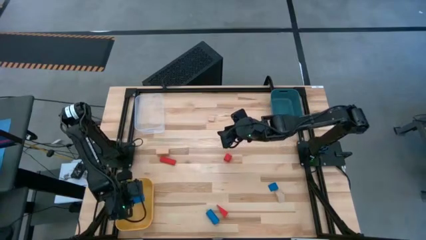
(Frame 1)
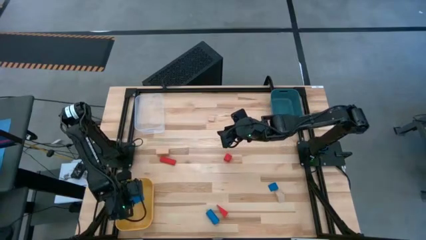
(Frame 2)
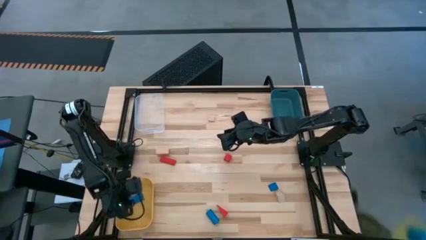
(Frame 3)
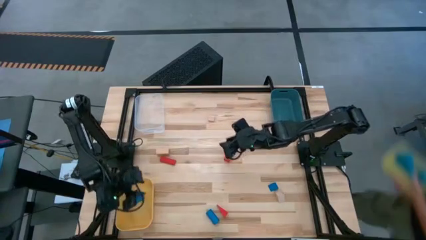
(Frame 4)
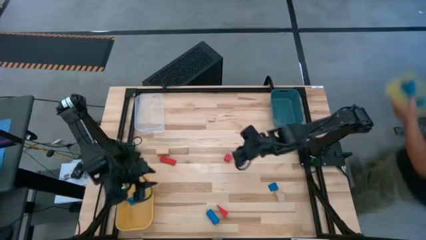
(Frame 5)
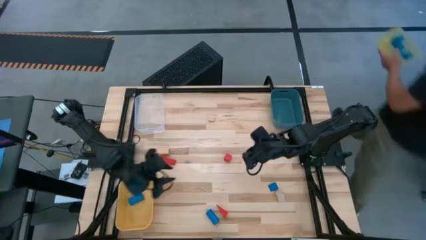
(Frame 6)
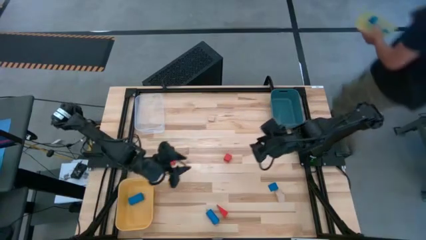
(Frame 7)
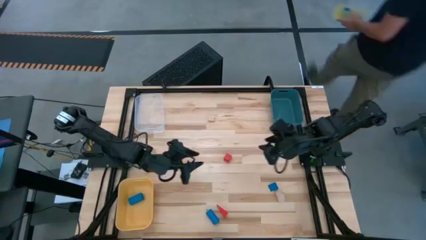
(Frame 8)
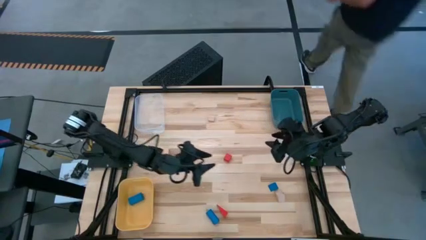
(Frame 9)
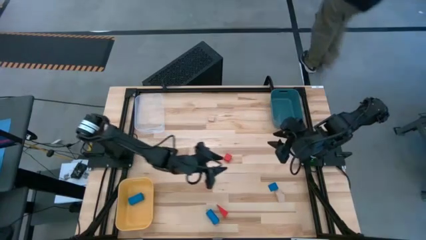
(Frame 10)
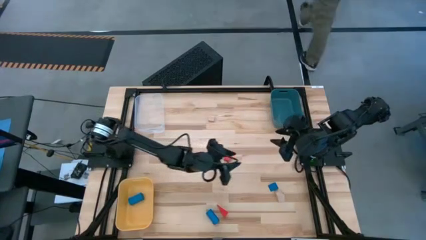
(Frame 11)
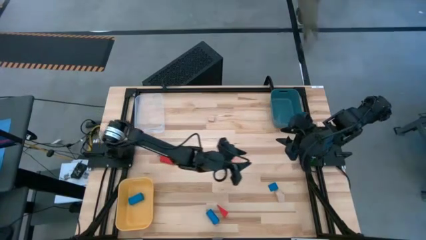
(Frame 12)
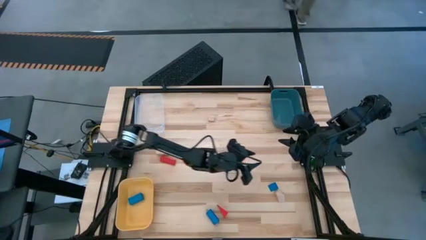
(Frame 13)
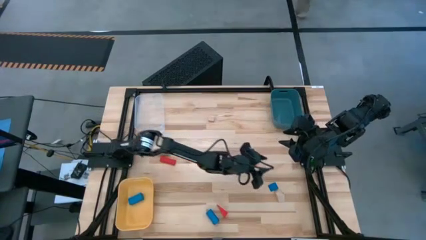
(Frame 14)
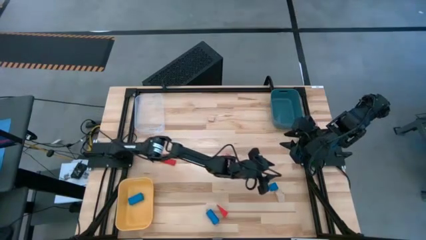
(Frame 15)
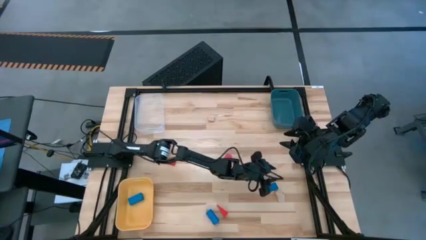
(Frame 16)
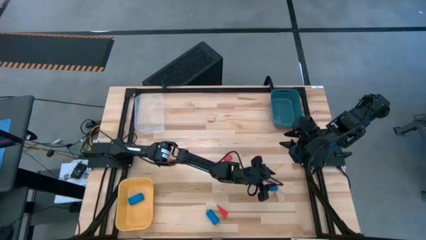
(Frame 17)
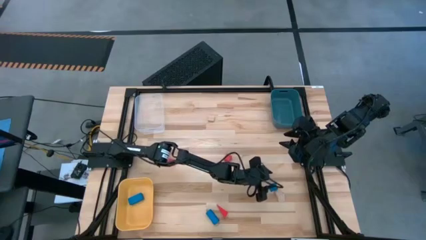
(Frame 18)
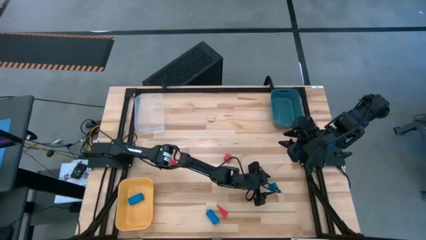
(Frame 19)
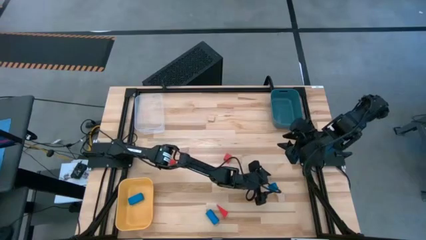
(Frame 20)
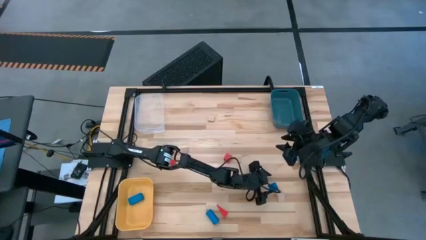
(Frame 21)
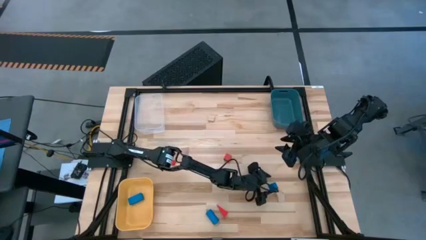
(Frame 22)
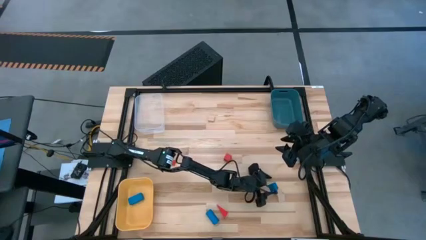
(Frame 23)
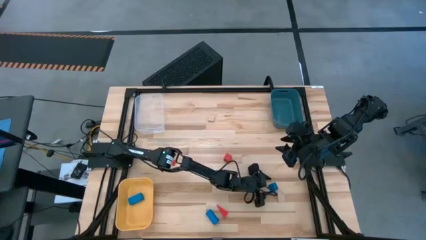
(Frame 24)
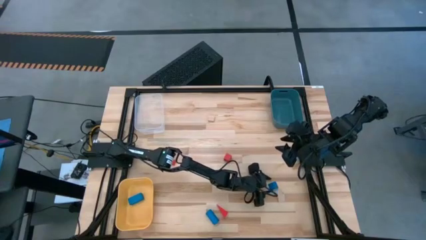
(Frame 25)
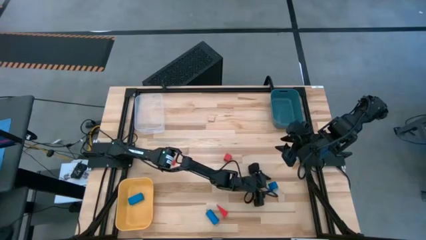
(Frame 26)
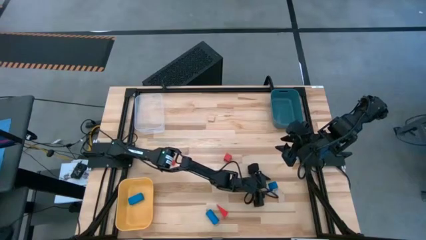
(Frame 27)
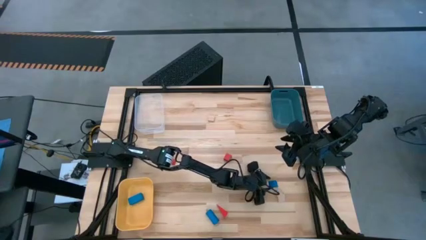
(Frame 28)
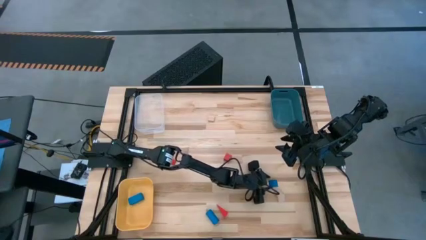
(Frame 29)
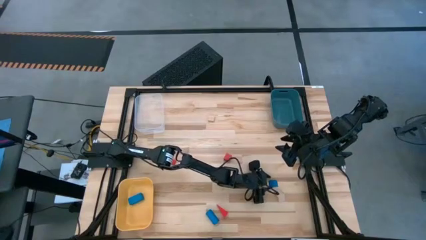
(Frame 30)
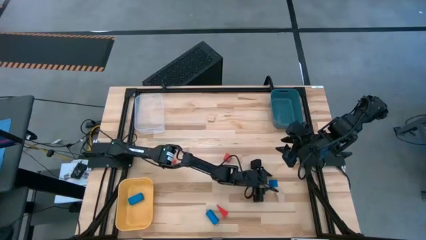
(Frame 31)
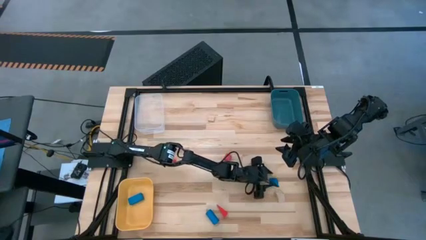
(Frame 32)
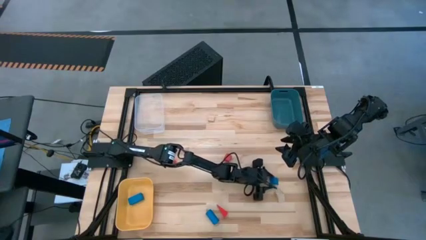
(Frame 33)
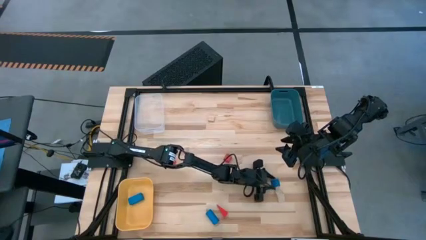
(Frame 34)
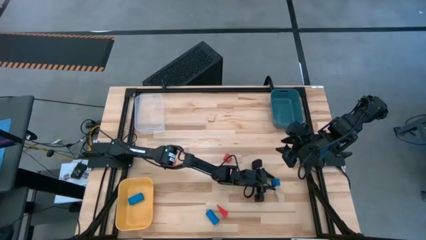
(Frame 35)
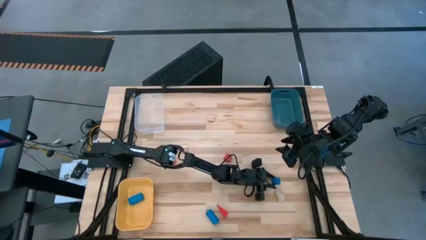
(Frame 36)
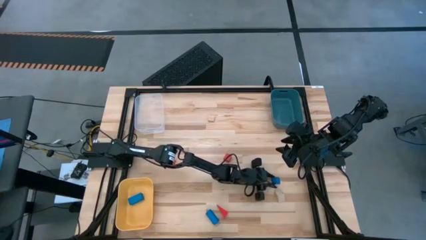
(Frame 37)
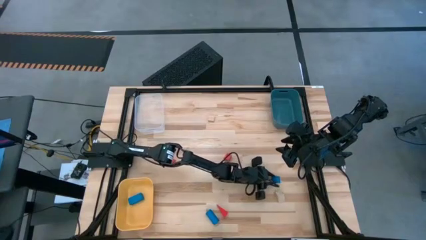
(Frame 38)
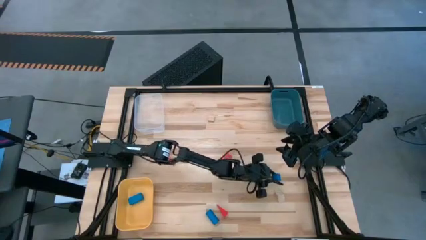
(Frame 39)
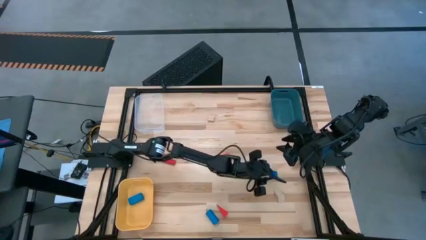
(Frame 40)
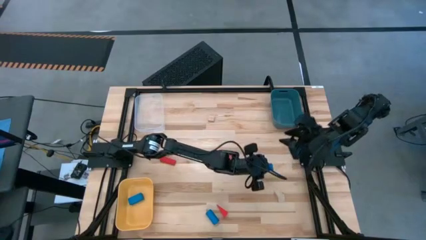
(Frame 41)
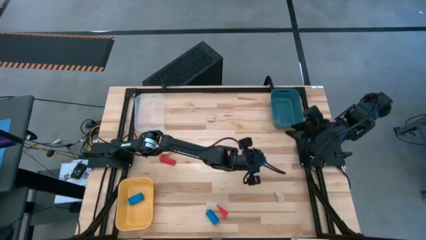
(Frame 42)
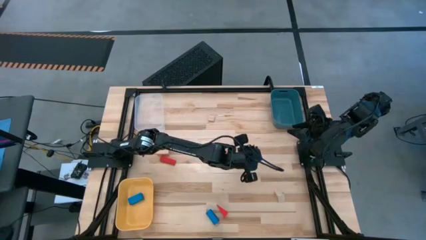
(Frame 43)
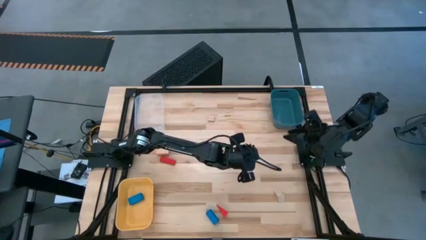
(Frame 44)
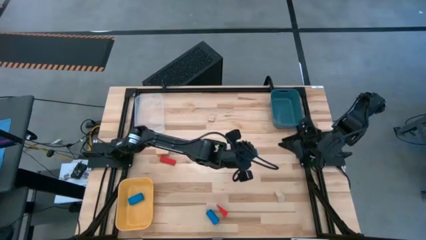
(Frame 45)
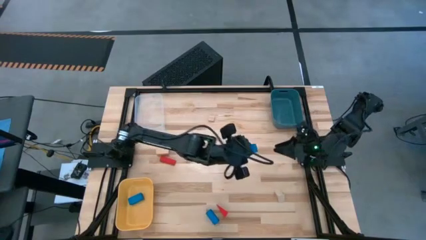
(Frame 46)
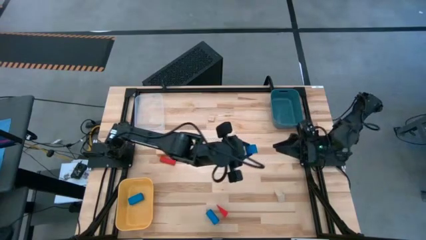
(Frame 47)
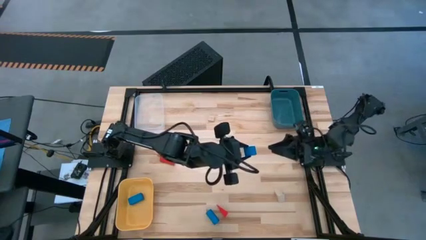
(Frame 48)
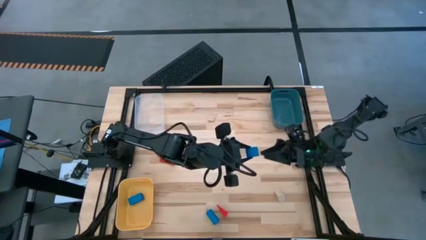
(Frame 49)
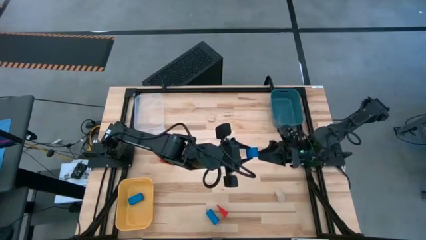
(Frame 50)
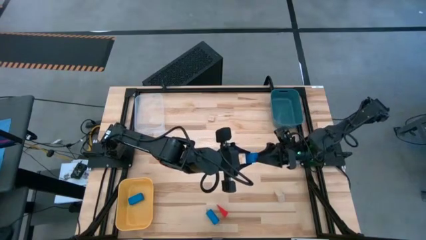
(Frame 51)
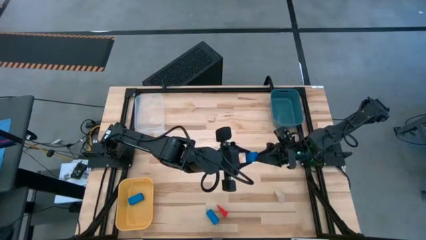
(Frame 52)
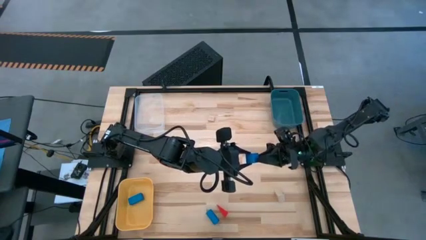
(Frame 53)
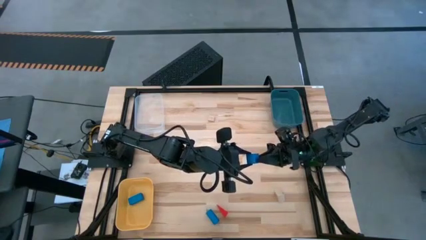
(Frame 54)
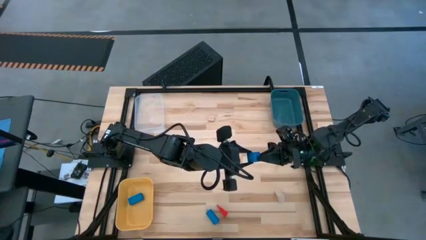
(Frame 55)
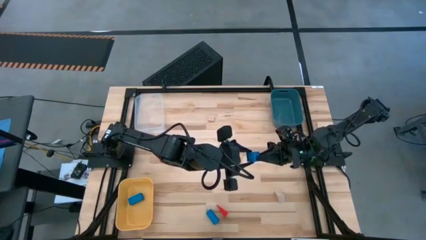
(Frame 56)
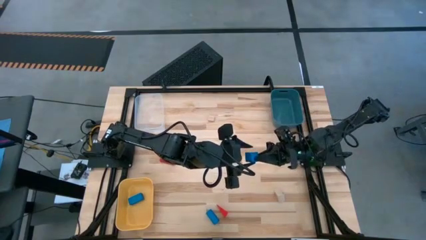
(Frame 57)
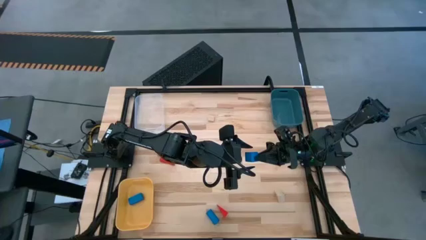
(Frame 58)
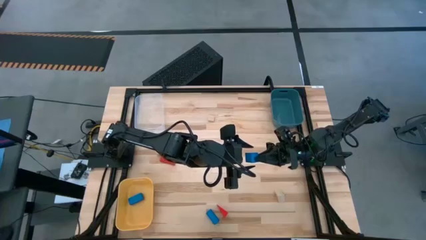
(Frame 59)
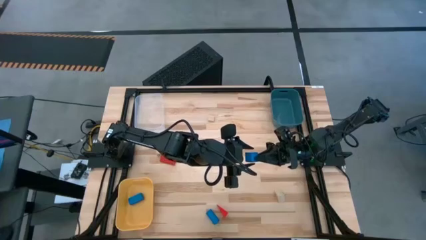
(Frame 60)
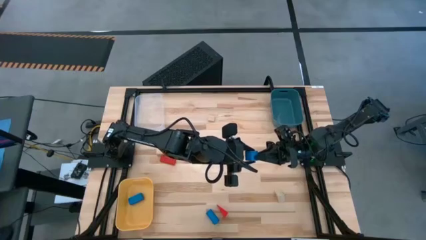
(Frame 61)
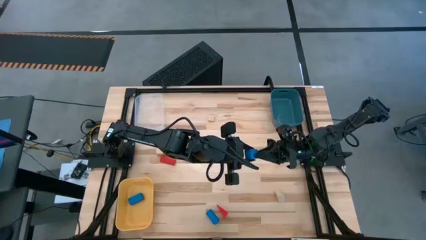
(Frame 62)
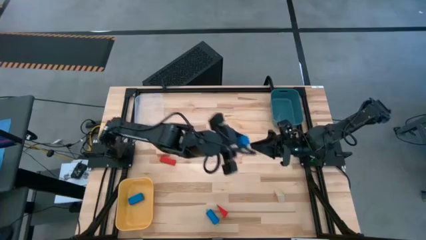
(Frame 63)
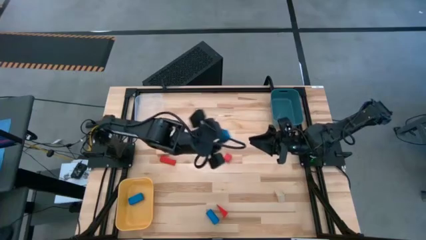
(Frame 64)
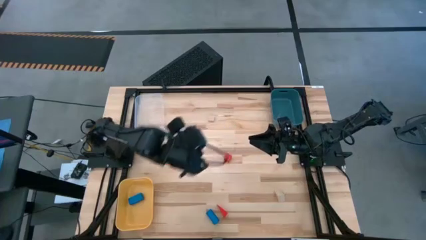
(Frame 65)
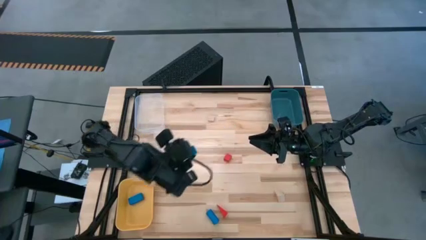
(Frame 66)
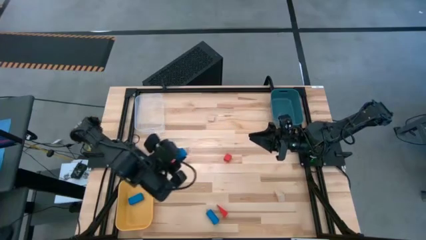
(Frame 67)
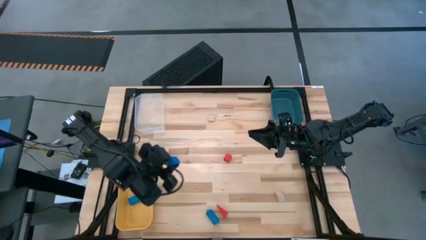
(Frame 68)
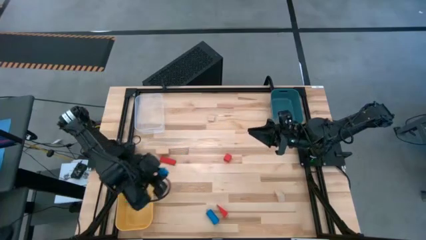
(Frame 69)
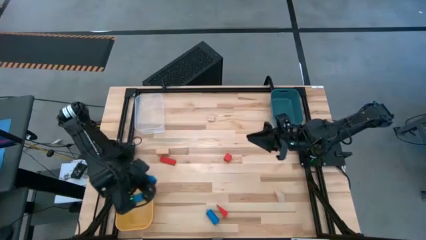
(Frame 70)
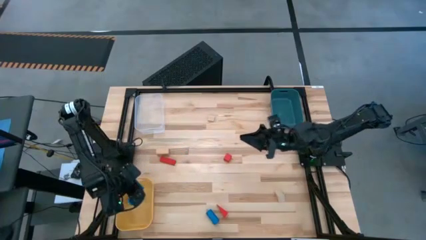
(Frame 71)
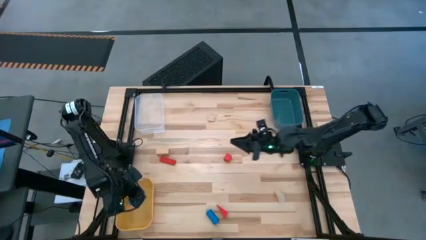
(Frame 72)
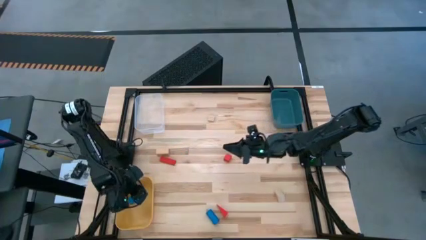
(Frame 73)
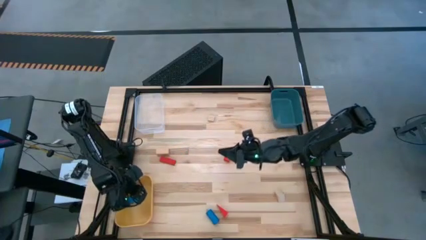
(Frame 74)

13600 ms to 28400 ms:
Task: Sort & place blocks by color
Put the top blue block into the yellow bin

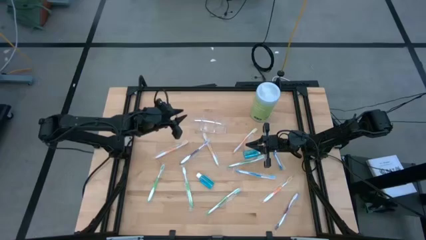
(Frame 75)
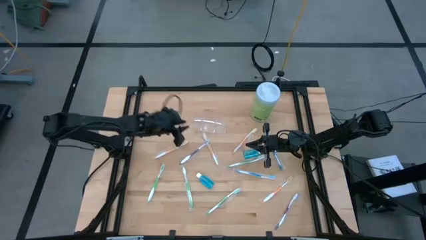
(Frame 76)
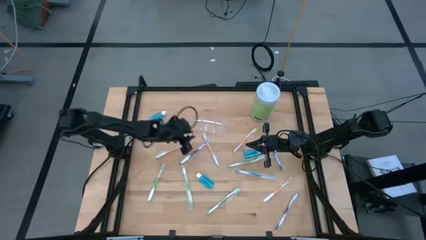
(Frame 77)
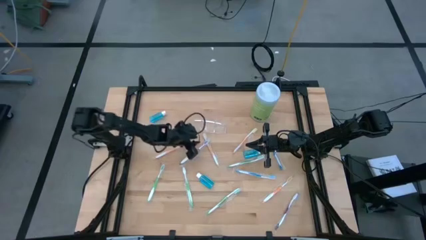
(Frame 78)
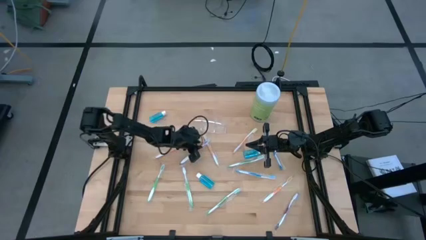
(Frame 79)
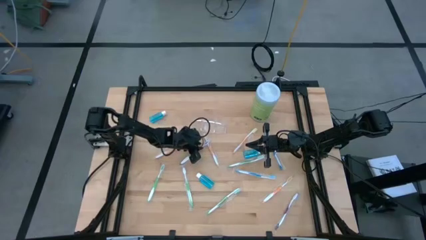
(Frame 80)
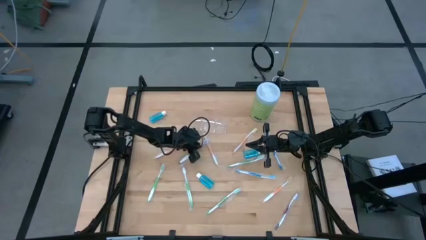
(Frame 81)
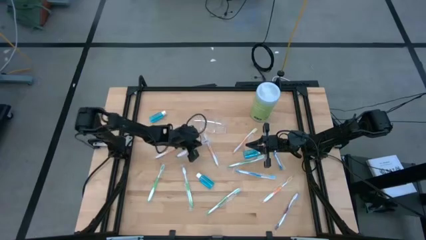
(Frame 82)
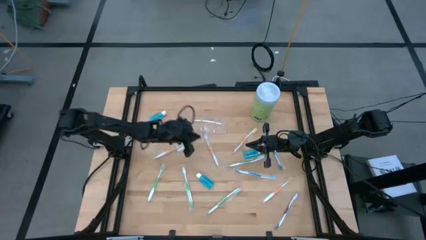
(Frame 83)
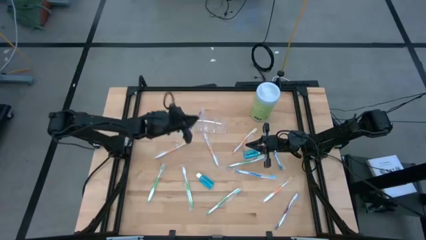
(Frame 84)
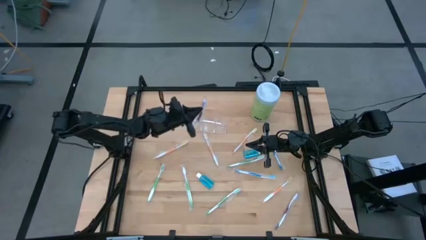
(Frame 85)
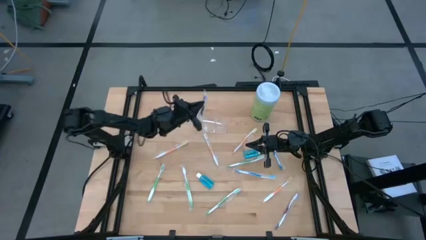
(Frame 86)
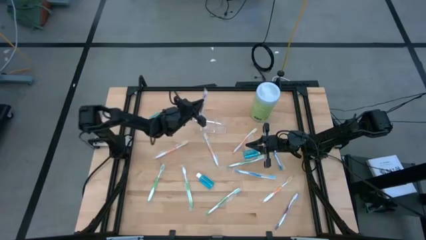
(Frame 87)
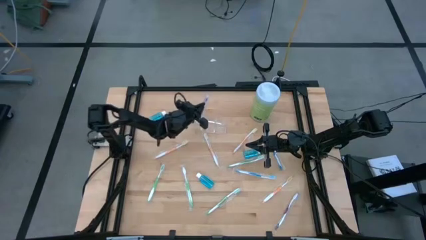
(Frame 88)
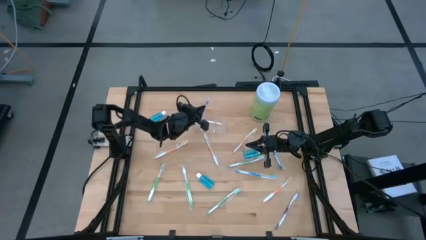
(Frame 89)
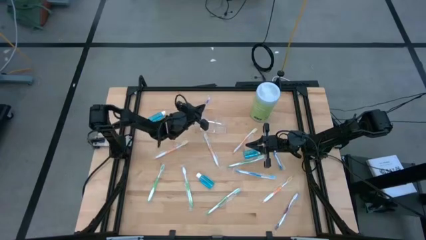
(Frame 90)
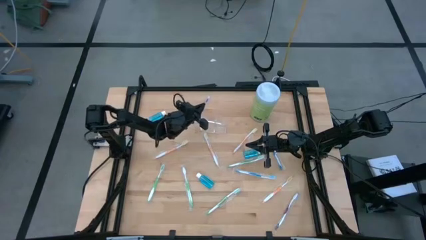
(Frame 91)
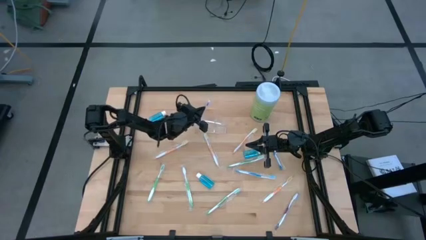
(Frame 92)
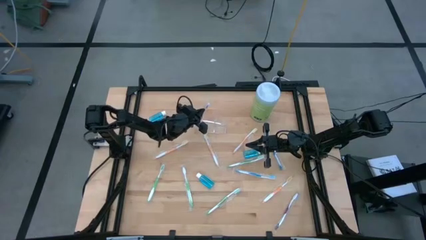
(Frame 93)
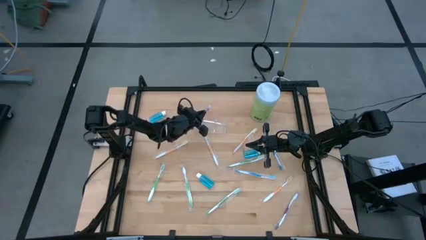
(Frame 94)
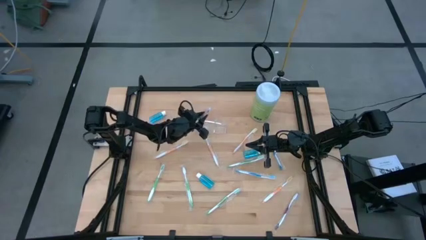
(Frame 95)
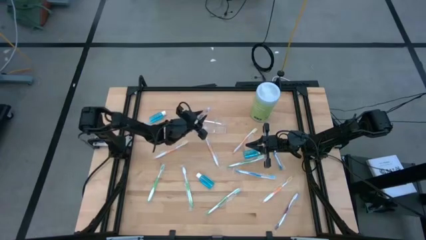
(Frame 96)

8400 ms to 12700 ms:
Task: Pick & Place toothbrushing station
Put the purple toothbrush into the transparent organizer
